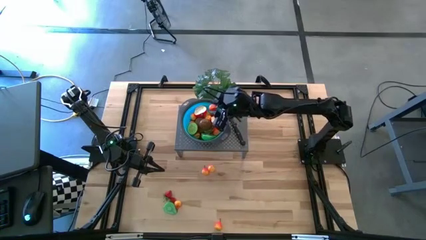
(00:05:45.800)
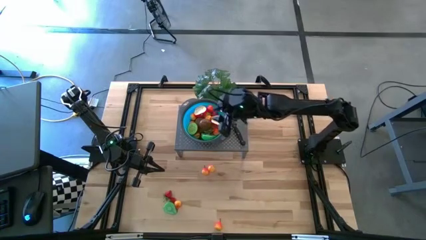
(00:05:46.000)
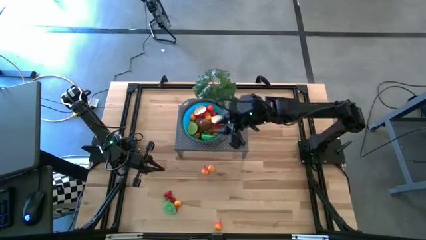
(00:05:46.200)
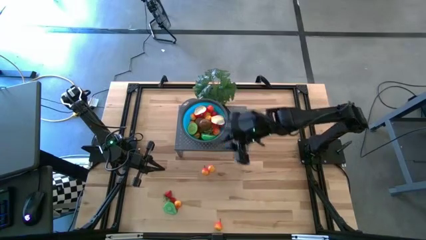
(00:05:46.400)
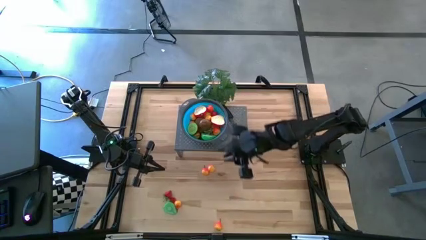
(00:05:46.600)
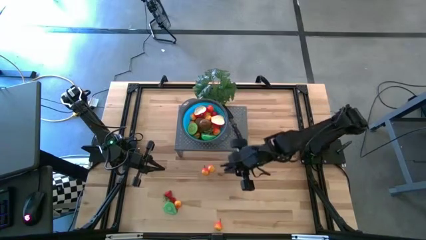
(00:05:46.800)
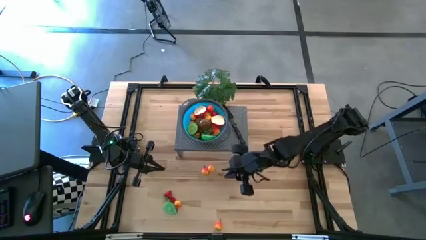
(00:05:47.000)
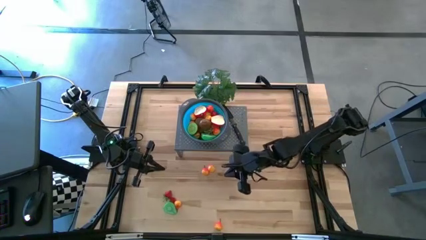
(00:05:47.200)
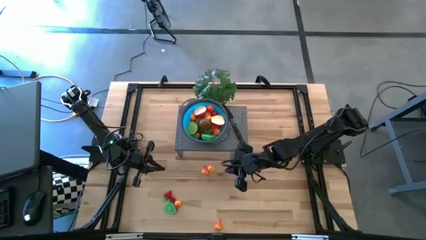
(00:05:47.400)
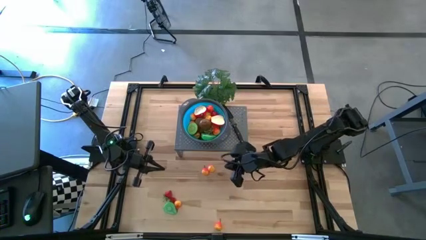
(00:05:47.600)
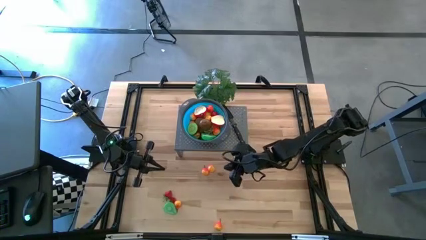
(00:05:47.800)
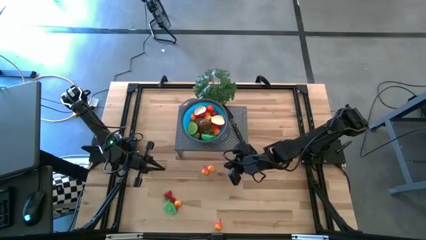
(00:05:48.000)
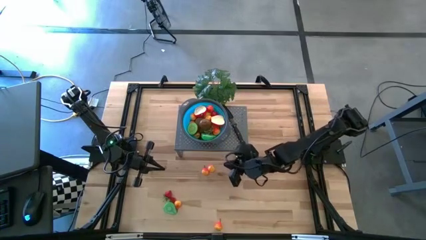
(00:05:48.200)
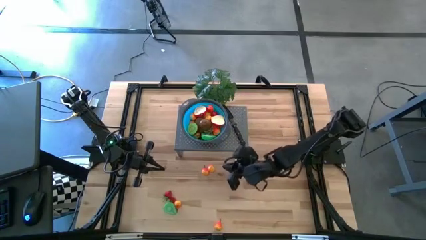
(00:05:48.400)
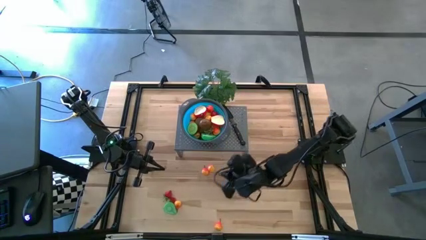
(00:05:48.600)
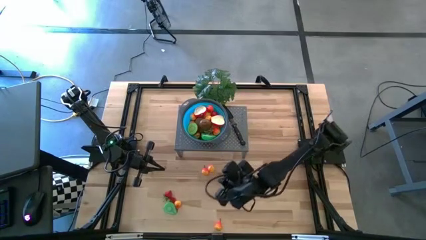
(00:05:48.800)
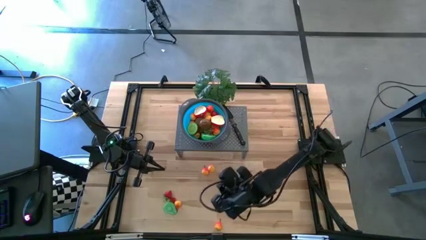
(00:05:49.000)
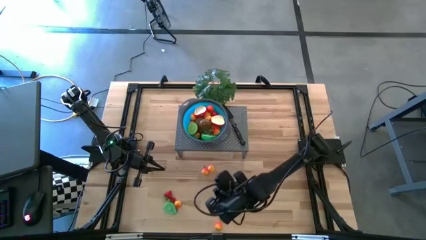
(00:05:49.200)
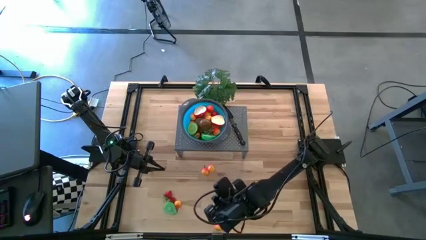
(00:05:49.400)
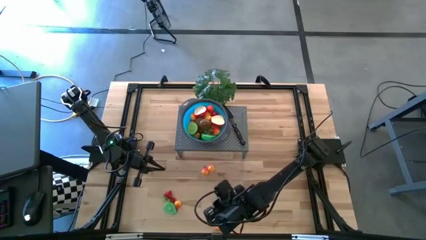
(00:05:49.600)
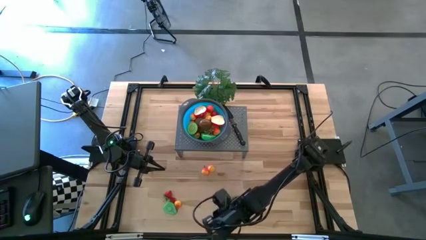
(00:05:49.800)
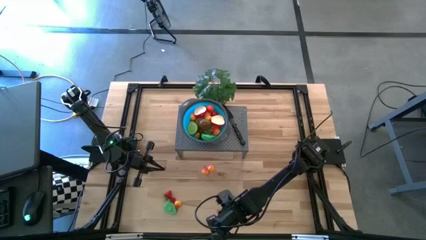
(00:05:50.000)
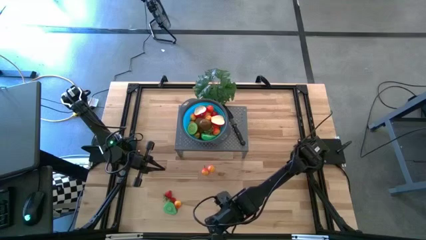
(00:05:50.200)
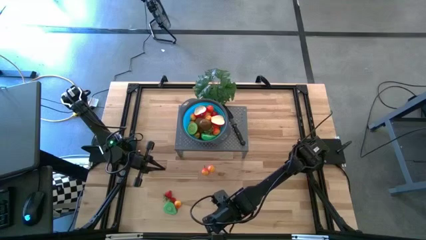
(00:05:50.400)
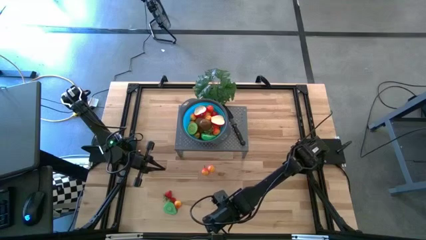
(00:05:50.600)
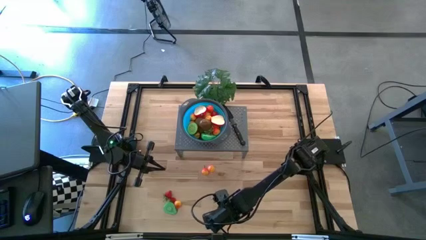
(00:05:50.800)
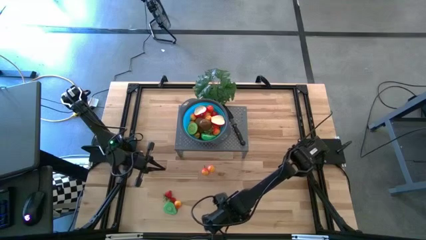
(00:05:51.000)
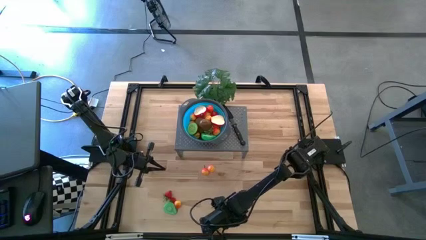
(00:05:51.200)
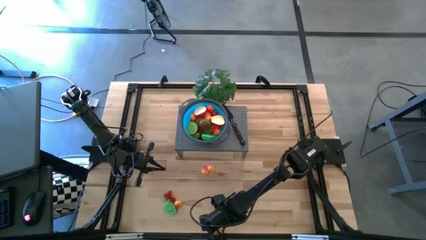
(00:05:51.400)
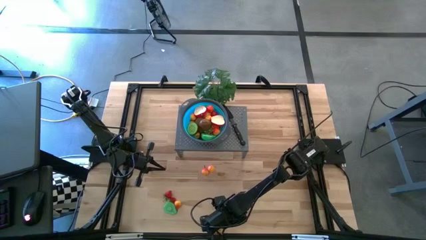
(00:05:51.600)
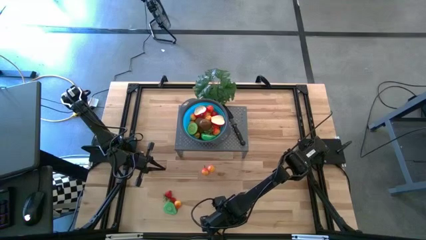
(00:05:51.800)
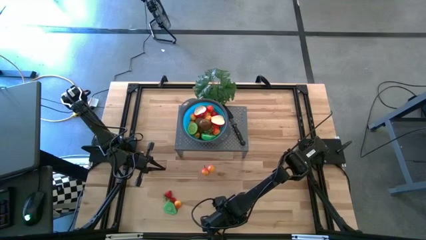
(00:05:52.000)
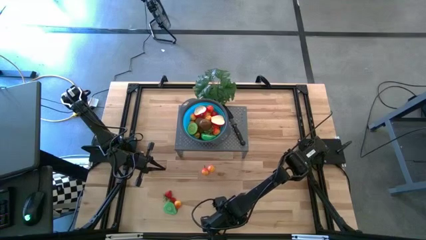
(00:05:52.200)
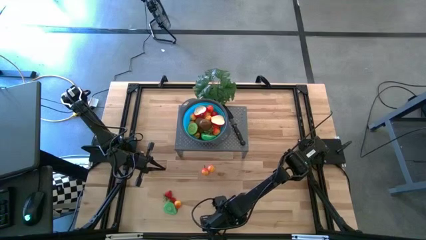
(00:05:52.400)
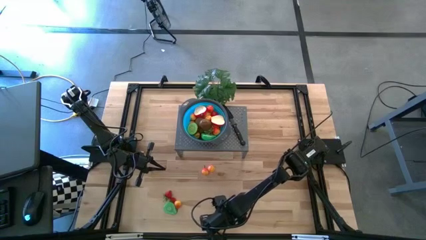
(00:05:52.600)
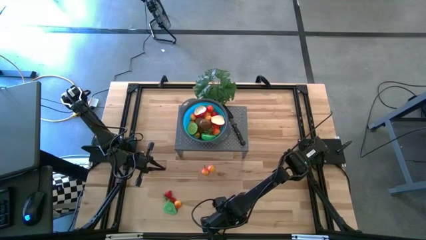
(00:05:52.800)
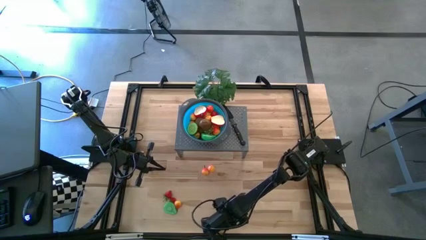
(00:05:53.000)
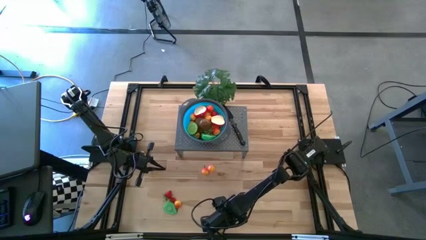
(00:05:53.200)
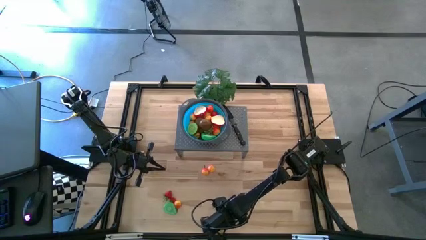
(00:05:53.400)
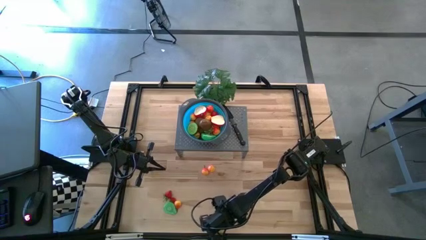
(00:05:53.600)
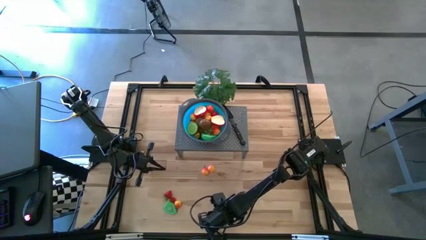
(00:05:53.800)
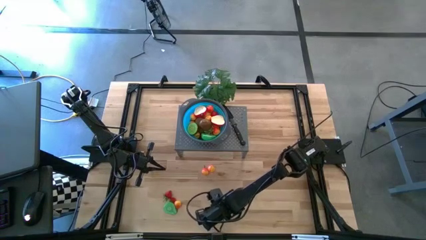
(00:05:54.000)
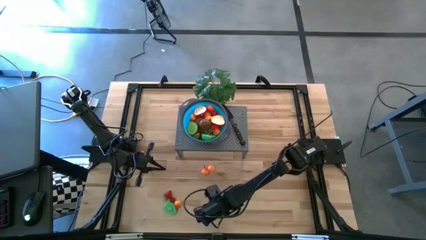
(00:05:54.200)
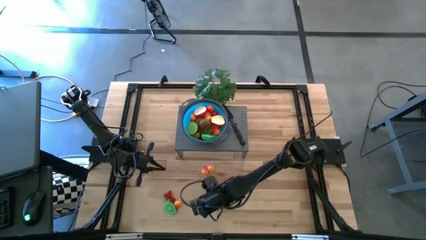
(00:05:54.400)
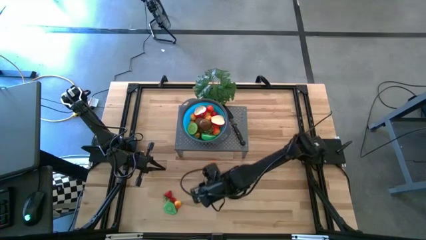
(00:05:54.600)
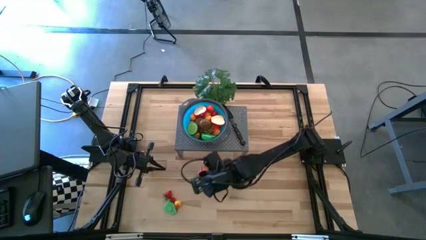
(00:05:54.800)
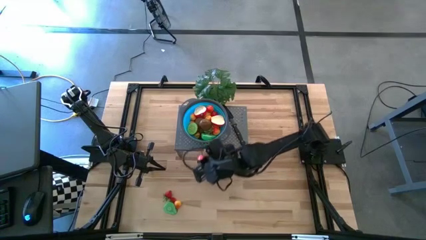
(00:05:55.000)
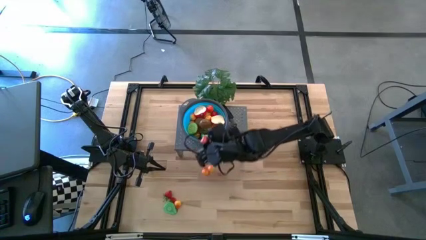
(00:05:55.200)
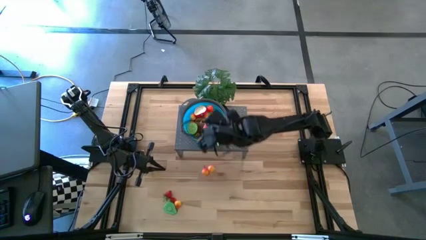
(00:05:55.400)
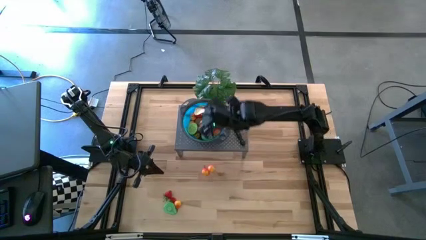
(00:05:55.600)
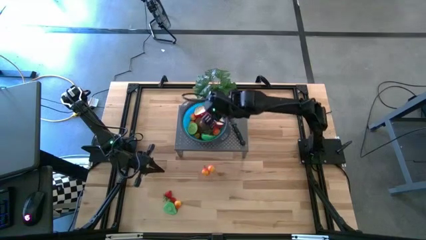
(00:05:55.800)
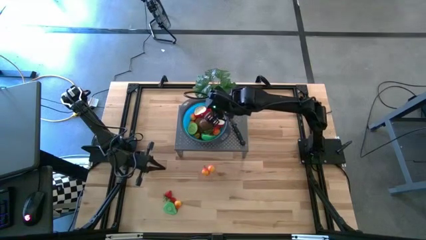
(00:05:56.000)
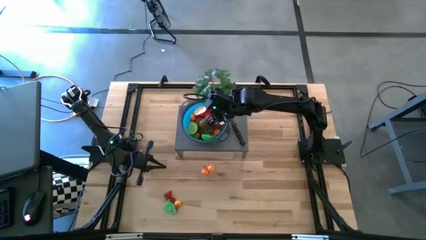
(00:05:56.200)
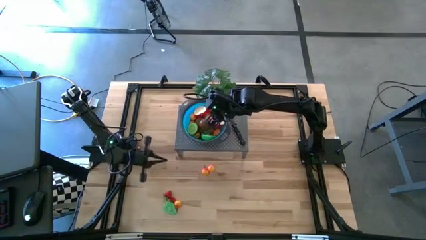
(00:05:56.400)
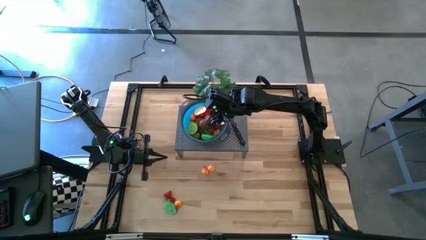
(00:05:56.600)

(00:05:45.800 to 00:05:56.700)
Task: Pick & Place Fruit
Put the pear into the blue strainer bowl on the shelf

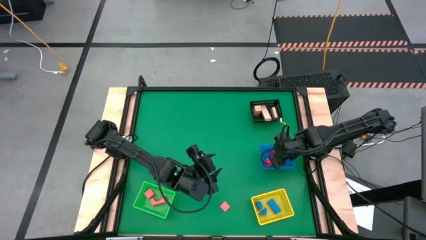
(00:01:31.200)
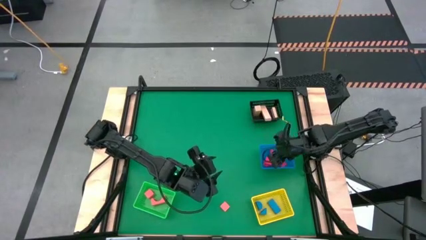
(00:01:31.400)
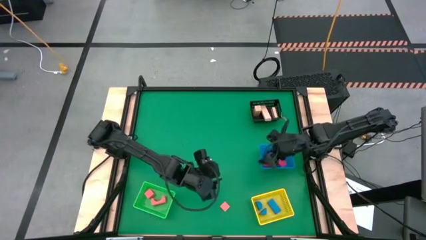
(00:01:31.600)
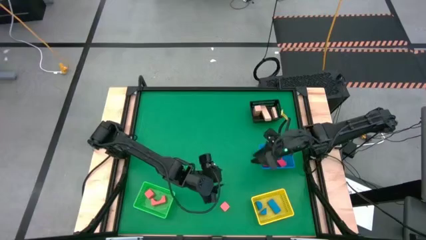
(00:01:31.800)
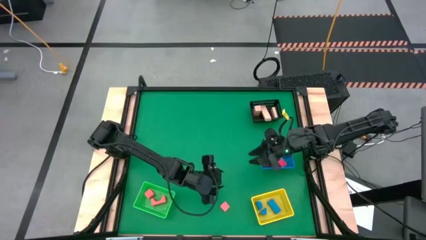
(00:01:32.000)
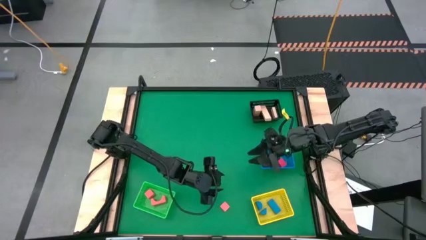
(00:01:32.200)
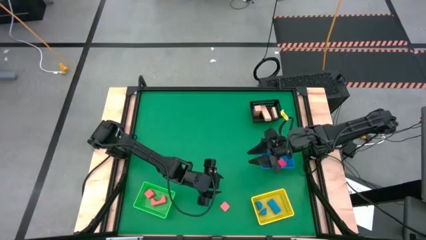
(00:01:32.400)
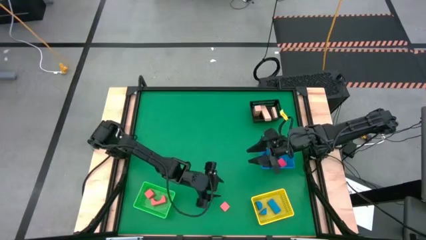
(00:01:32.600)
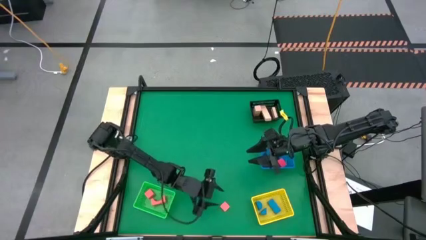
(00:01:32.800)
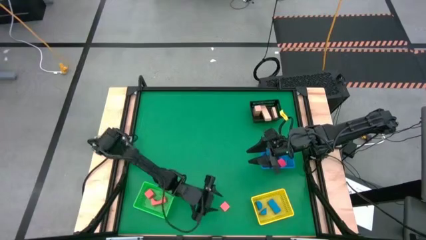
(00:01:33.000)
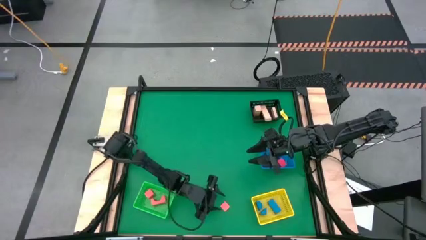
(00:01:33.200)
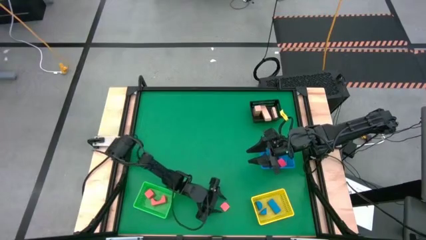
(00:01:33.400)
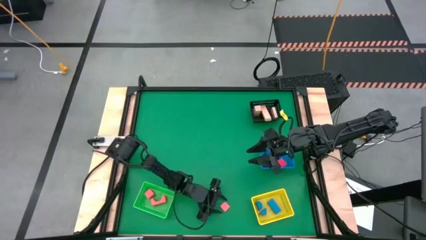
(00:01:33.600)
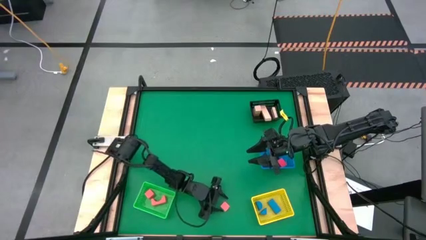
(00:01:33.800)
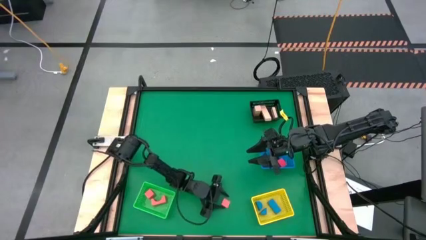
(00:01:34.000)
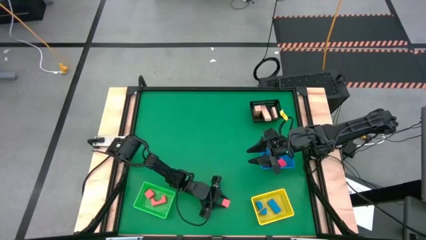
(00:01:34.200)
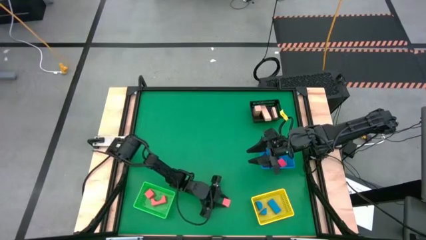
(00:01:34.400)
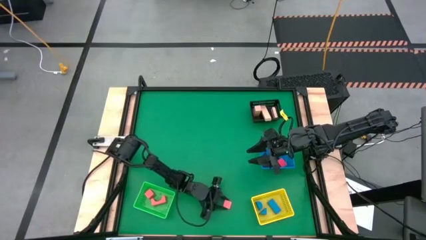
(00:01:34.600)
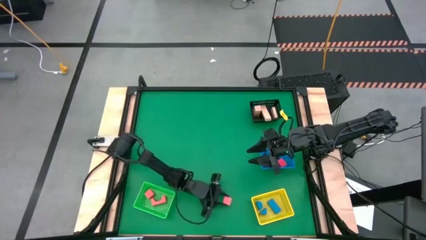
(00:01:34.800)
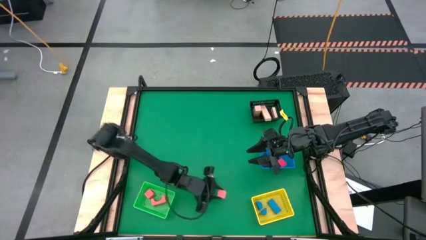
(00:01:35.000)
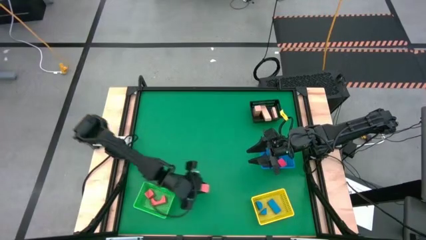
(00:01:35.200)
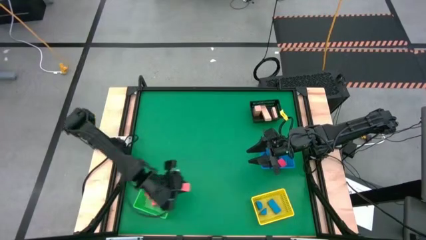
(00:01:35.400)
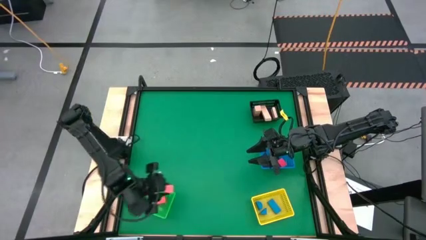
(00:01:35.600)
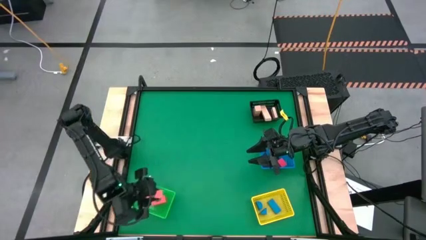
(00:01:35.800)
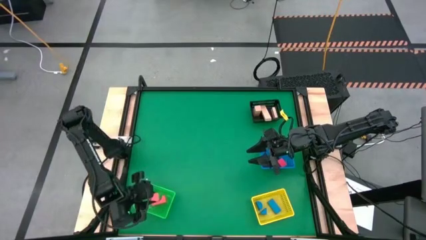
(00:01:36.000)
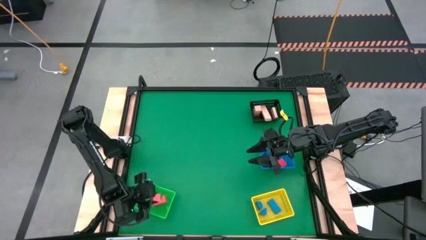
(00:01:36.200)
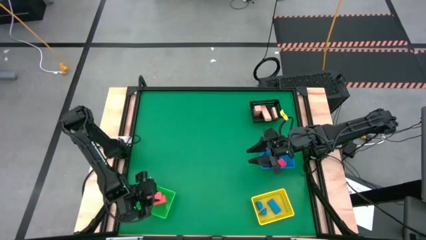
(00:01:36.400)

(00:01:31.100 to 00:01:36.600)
Task: Sort & place blocks by color
Put the orange block into the green bin
